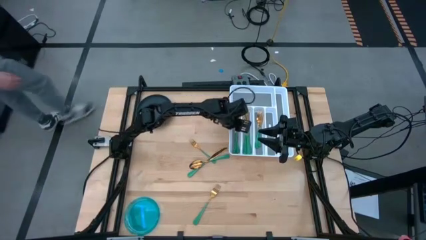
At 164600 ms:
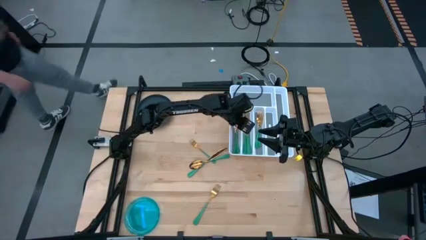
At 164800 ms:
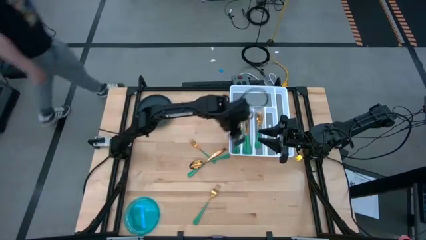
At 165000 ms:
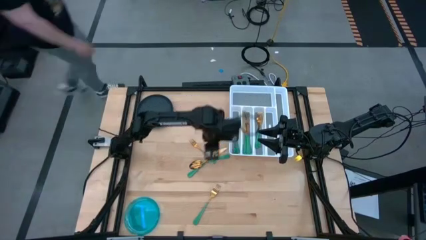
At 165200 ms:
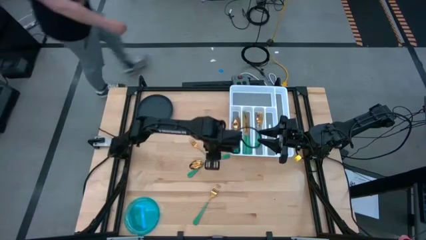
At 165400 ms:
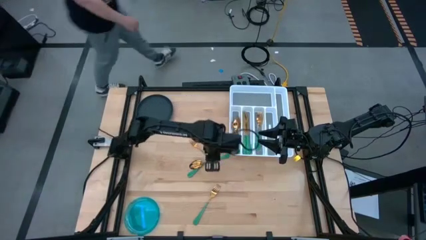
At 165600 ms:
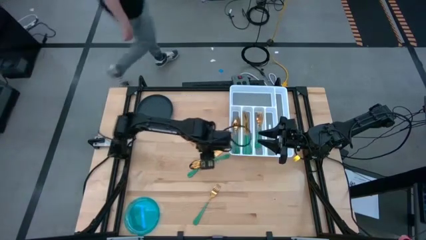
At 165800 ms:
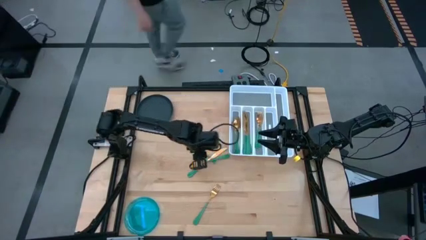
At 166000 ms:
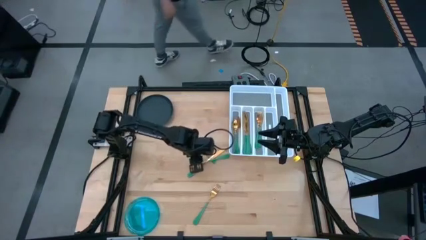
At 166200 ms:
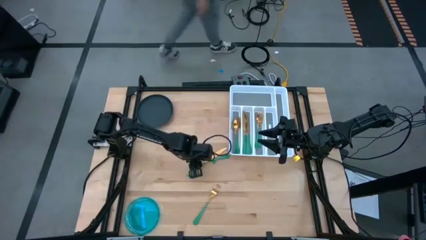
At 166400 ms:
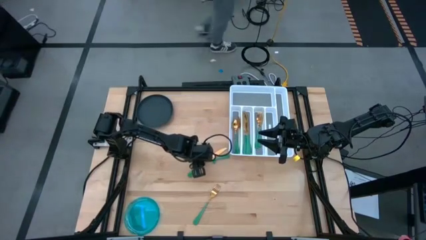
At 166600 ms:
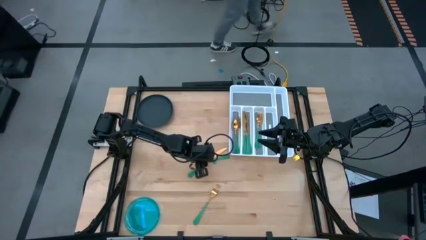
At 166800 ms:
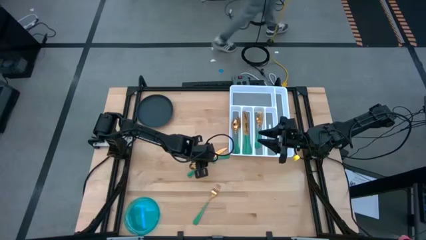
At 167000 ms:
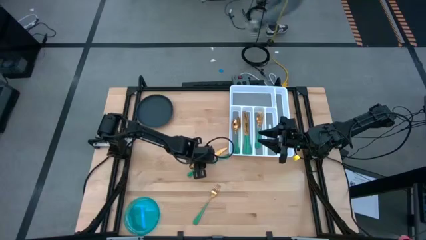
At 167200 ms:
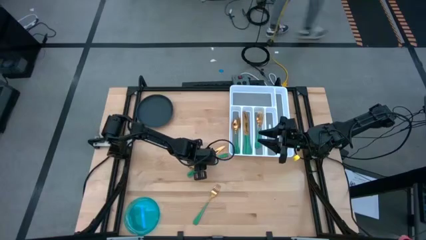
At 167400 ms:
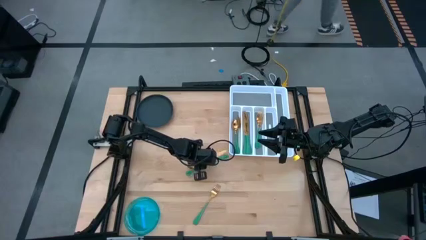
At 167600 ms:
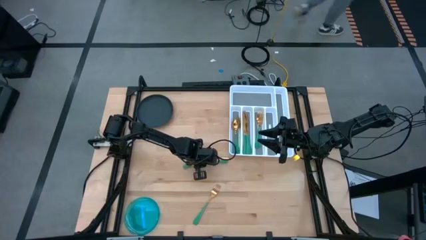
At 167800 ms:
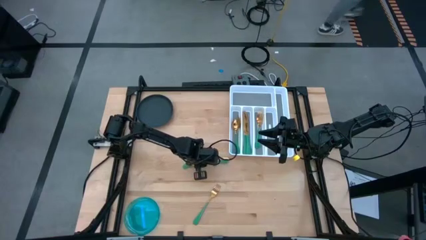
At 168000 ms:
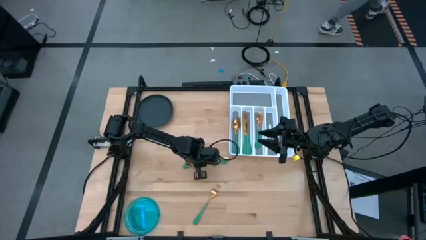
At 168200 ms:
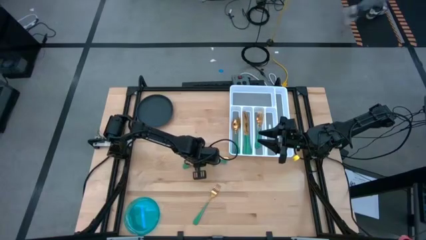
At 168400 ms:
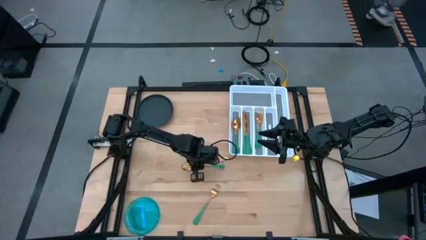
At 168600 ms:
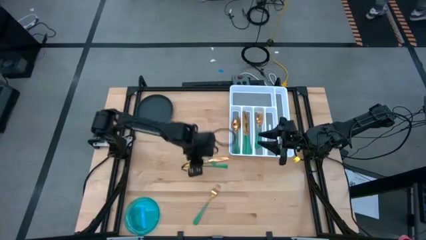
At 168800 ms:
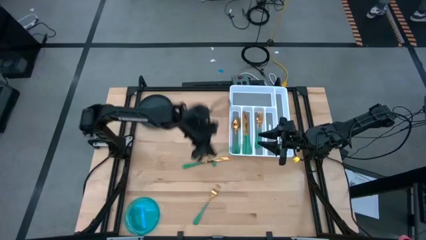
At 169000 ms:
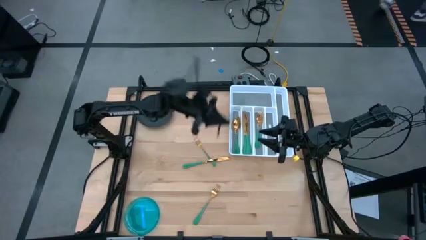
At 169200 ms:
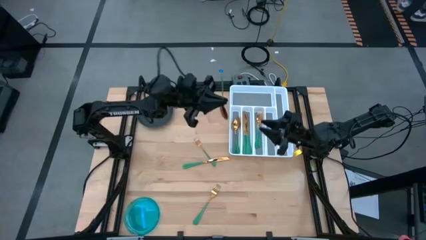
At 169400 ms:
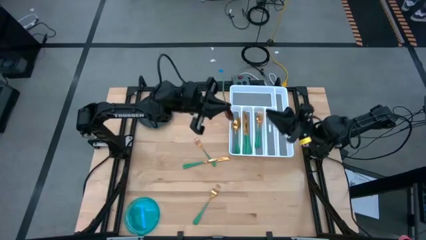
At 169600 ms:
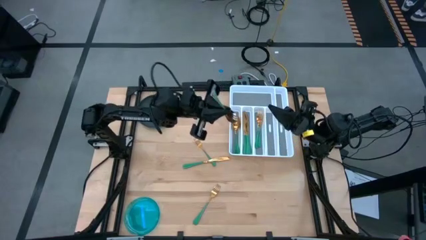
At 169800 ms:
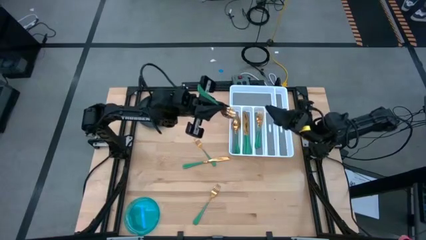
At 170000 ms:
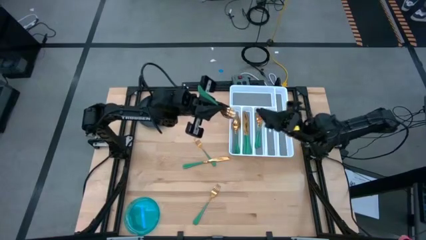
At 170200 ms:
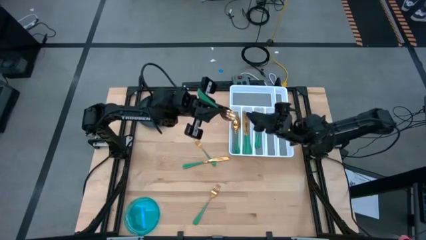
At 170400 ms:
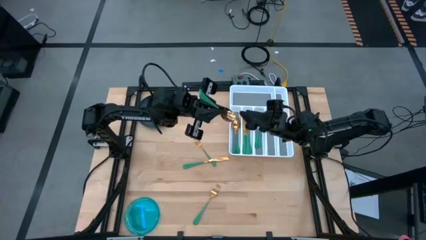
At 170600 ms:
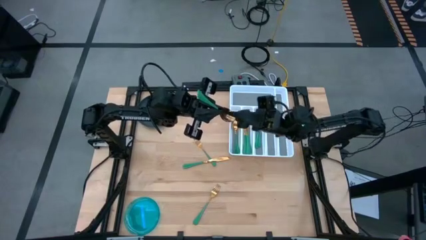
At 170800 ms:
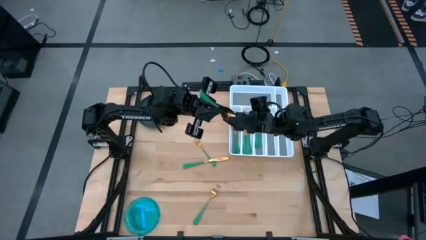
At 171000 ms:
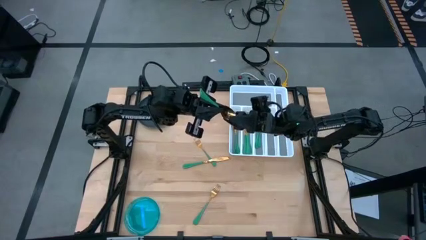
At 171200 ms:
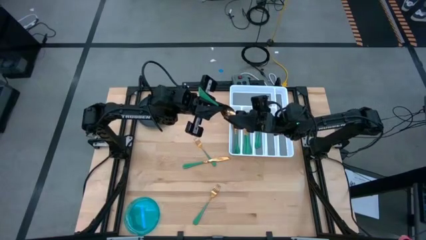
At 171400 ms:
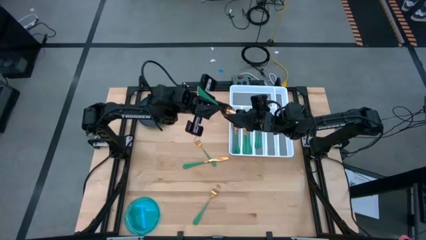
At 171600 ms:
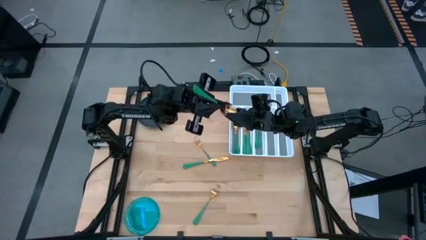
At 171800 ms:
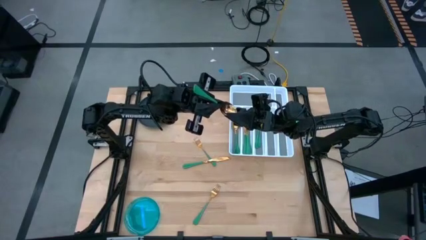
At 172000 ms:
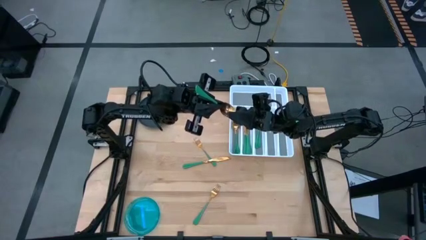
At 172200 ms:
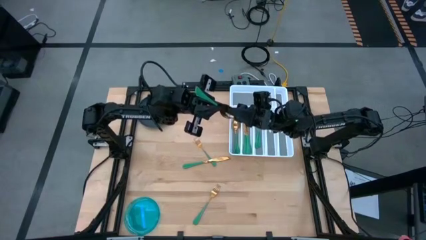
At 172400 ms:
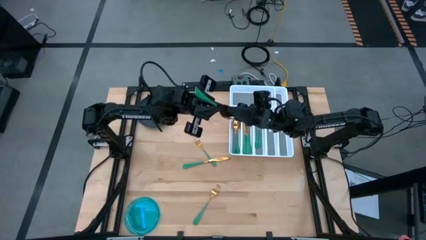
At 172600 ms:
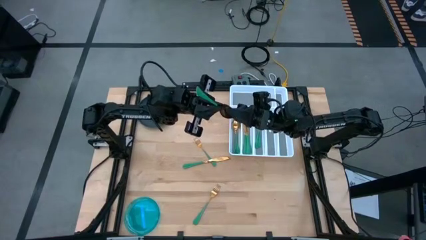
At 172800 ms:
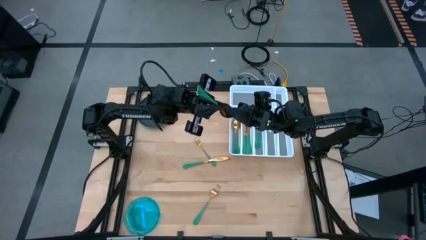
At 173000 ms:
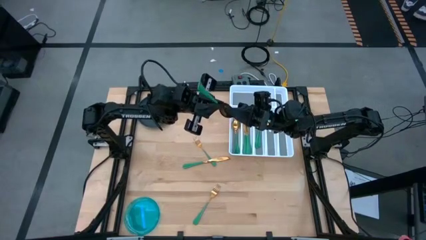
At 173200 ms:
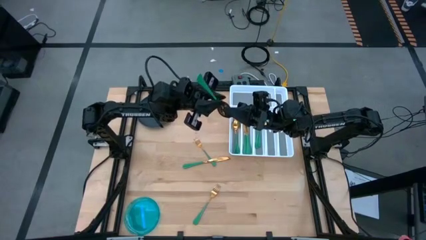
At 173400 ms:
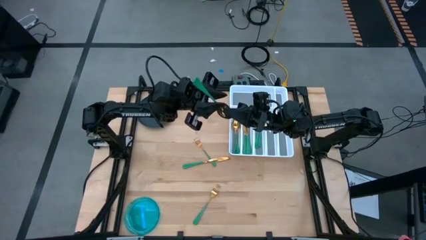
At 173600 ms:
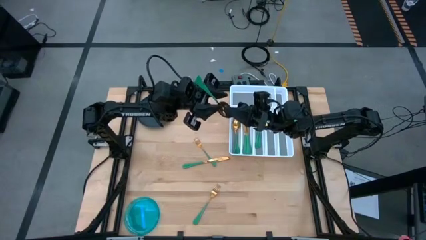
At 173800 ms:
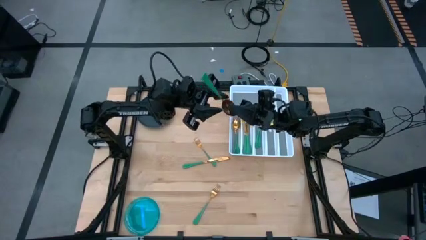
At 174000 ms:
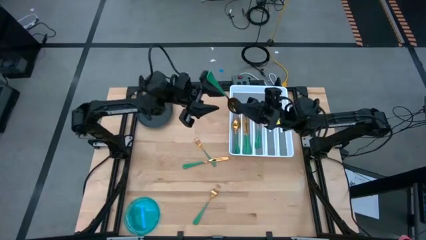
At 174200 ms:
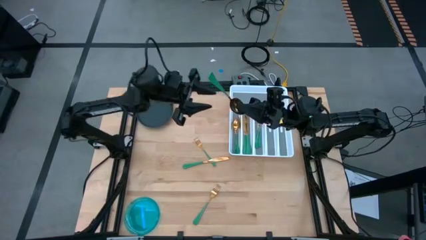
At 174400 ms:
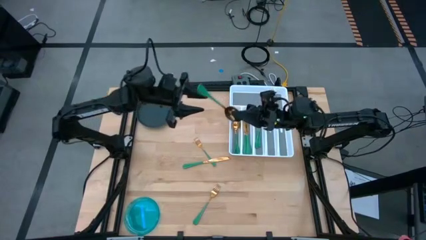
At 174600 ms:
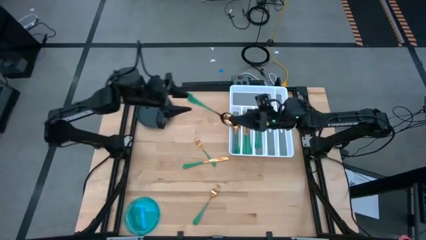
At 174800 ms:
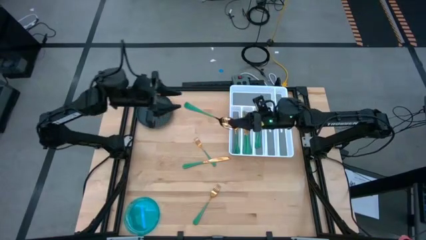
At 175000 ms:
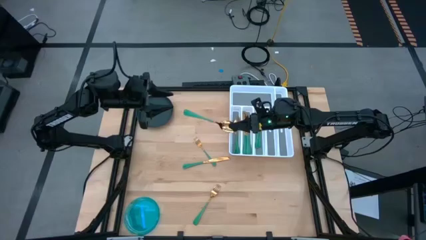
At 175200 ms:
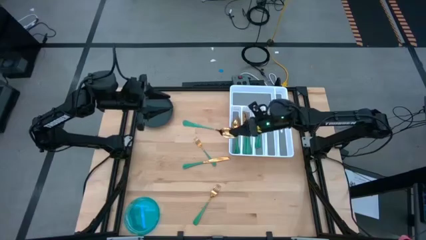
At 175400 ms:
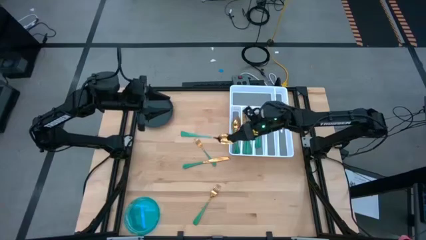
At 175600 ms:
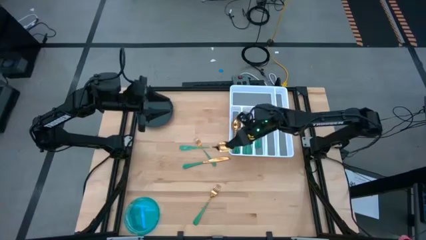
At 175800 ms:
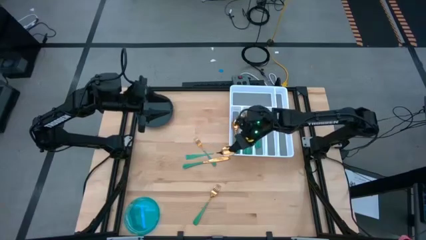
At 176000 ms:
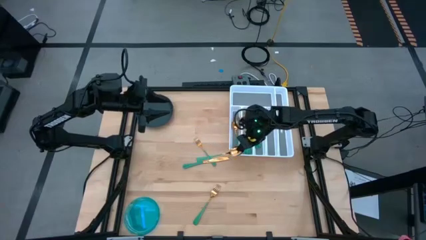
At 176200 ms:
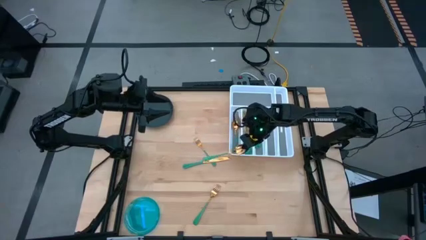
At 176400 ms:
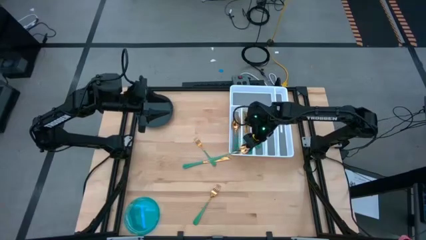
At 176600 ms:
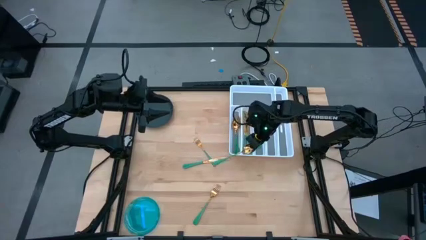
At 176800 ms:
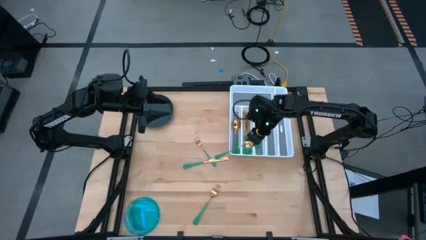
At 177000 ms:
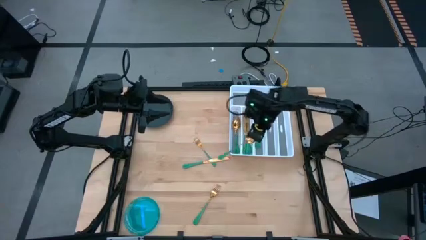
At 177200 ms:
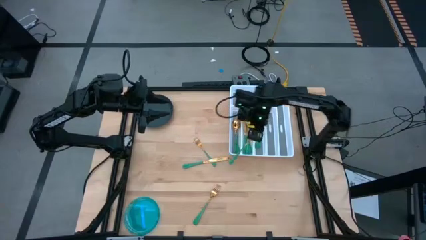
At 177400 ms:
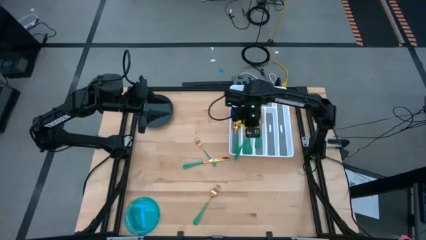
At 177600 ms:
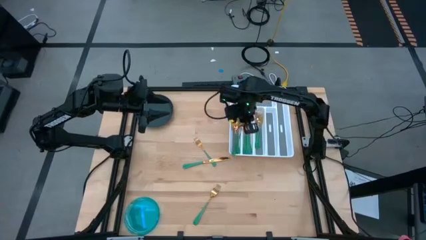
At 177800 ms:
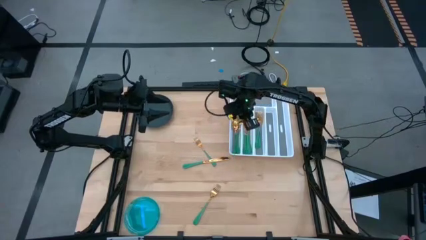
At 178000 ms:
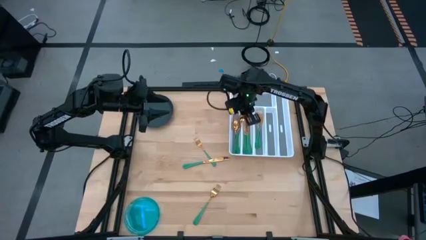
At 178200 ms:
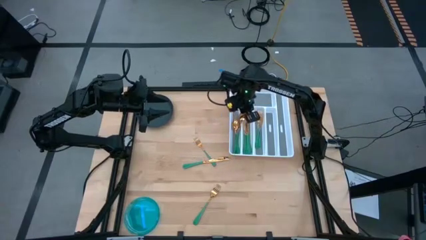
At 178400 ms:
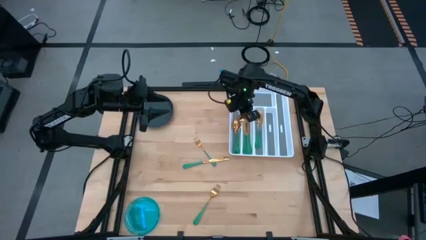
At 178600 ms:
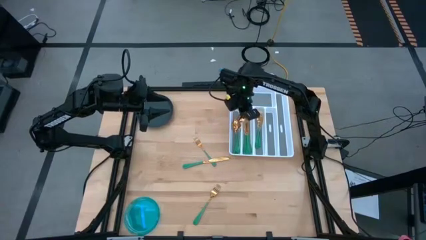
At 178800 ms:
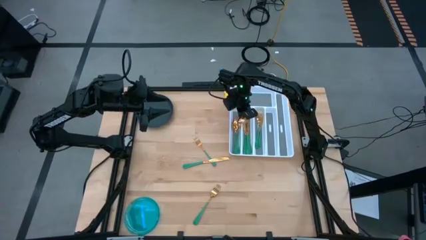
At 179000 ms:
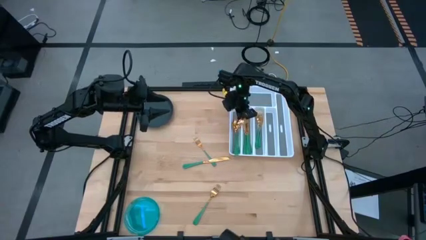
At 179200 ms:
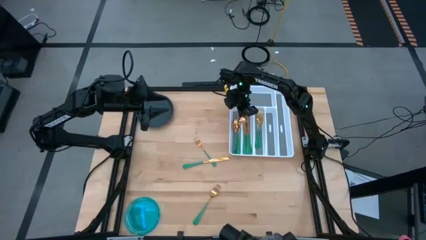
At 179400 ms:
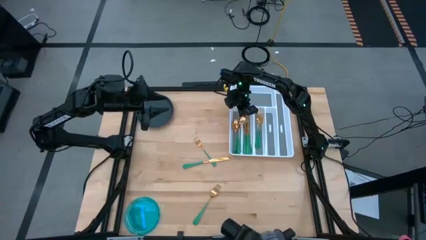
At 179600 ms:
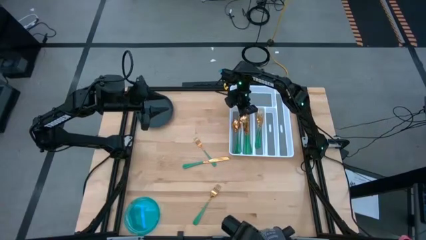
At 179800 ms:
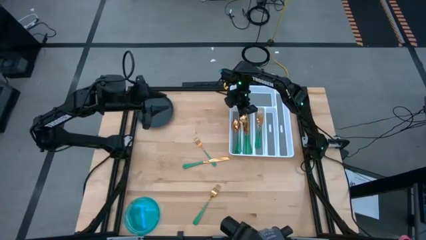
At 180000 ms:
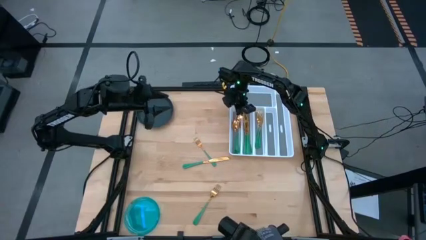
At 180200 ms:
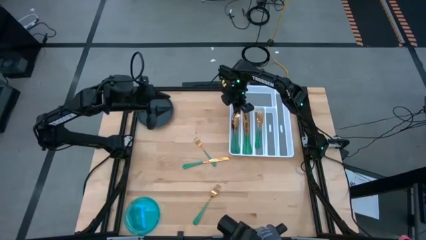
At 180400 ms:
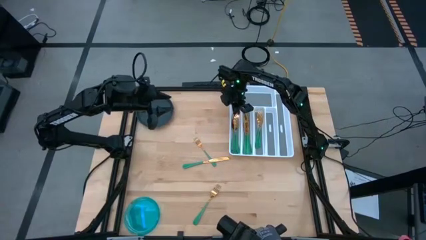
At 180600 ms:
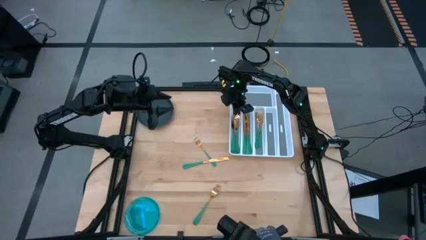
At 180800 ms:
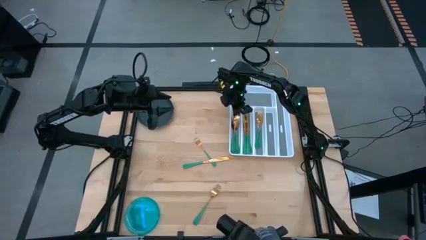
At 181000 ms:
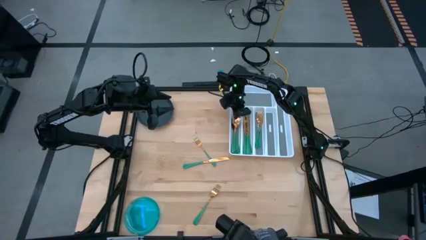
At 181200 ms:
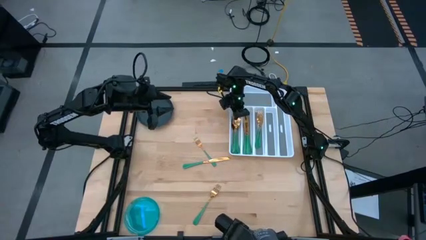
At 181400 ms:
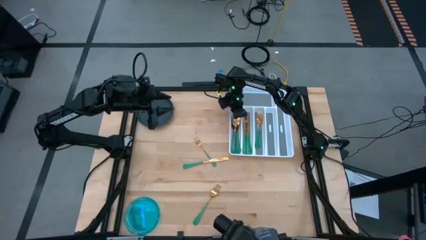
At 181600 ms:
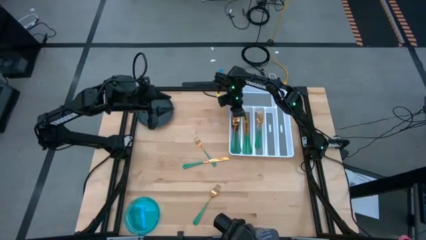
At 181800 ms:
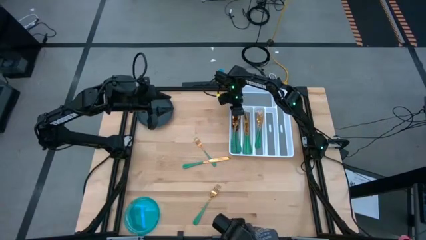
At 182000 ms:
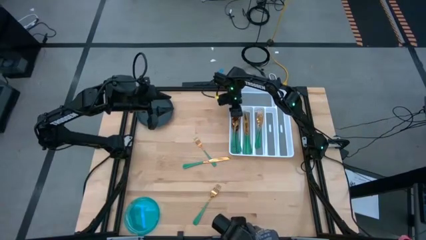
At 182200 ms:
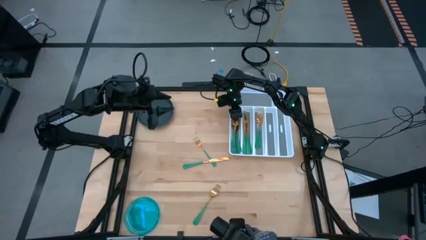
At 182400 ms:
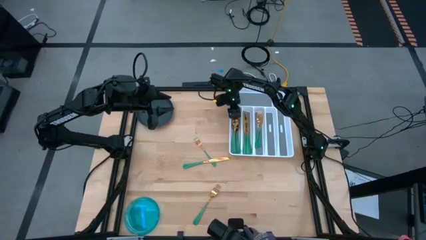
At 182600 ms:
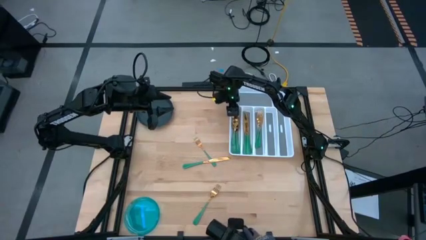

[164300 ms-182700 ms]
Task: Sort silverware
Put the green spoon on the silverware organizer
